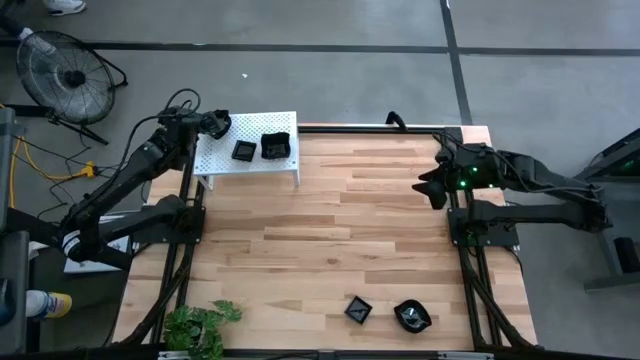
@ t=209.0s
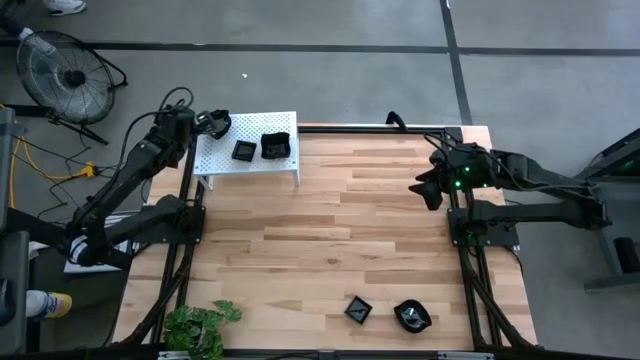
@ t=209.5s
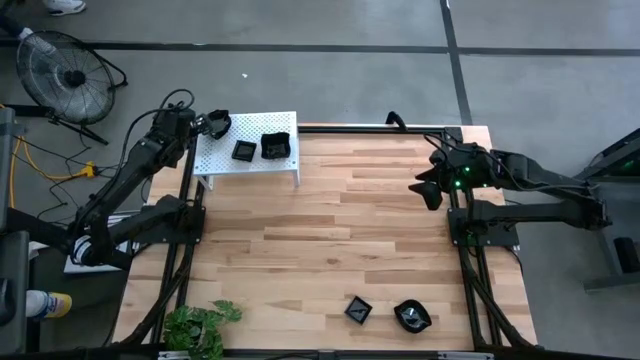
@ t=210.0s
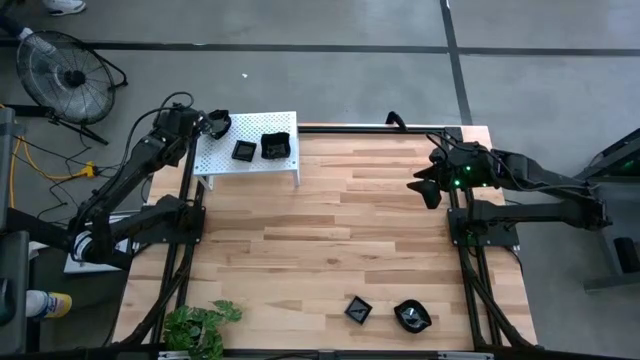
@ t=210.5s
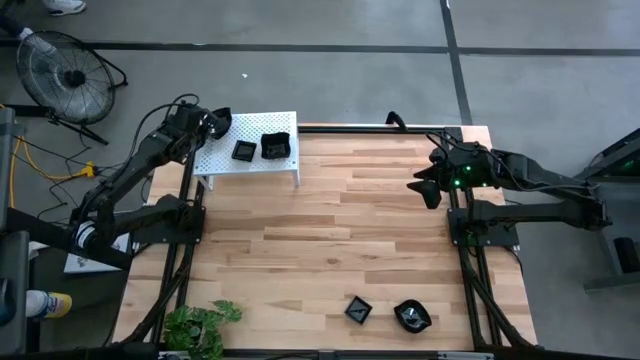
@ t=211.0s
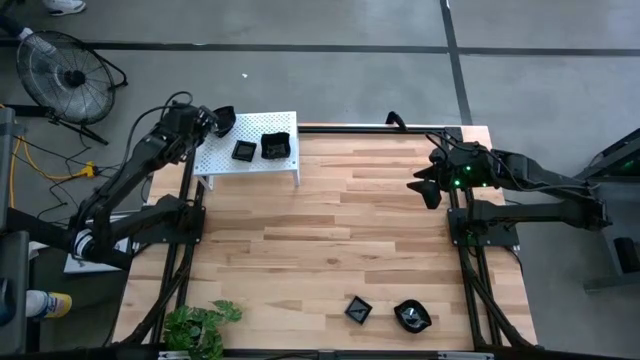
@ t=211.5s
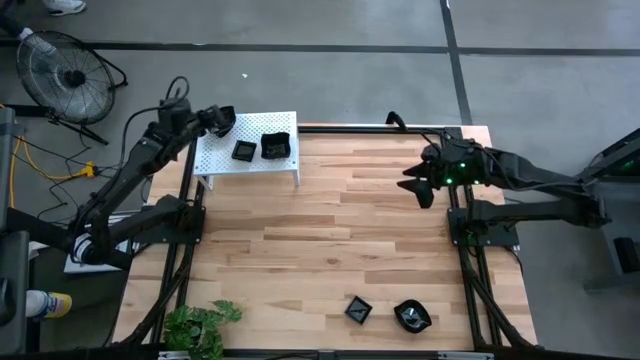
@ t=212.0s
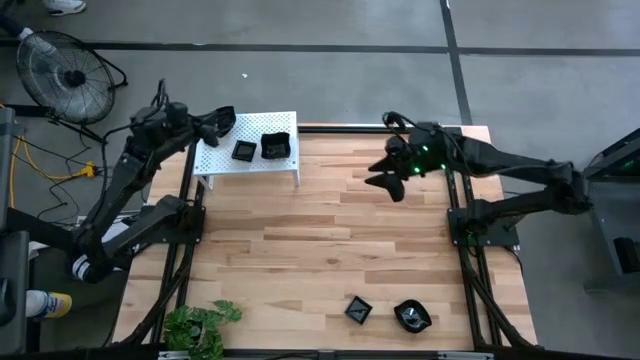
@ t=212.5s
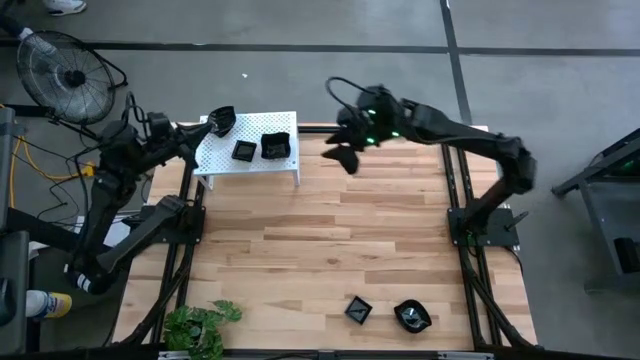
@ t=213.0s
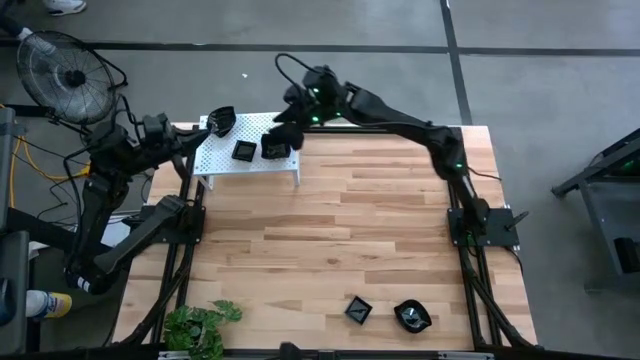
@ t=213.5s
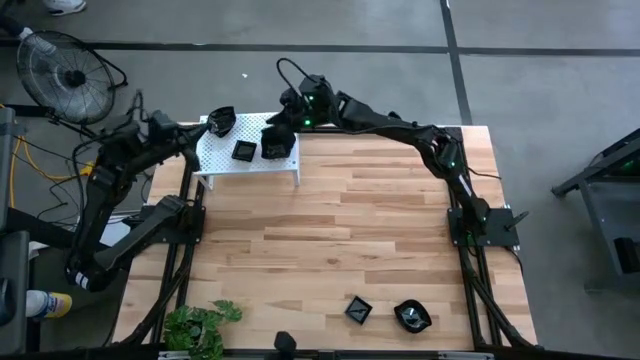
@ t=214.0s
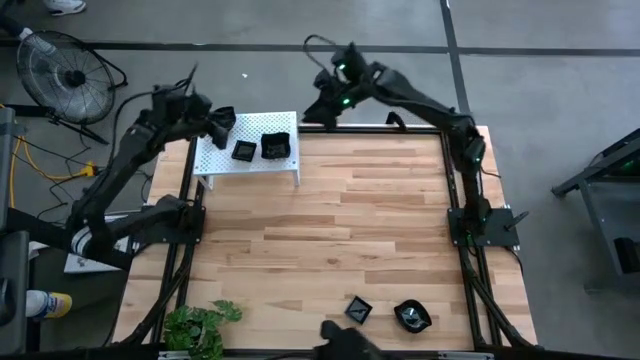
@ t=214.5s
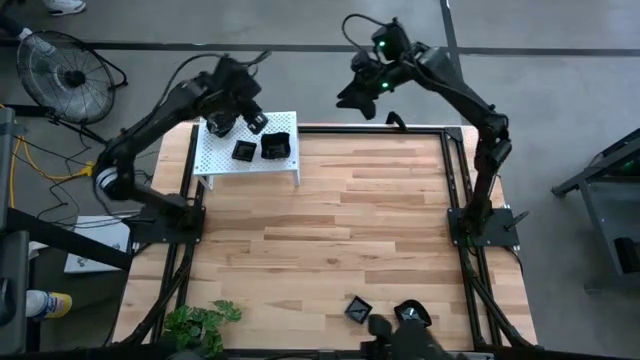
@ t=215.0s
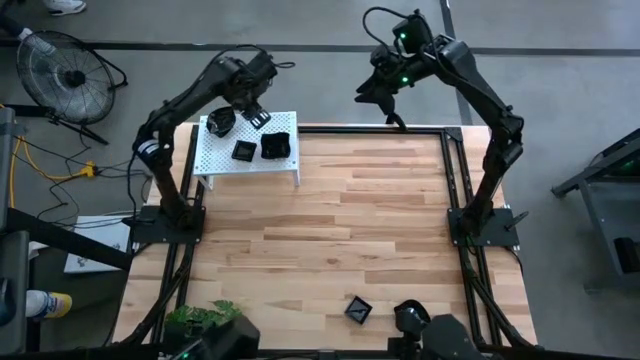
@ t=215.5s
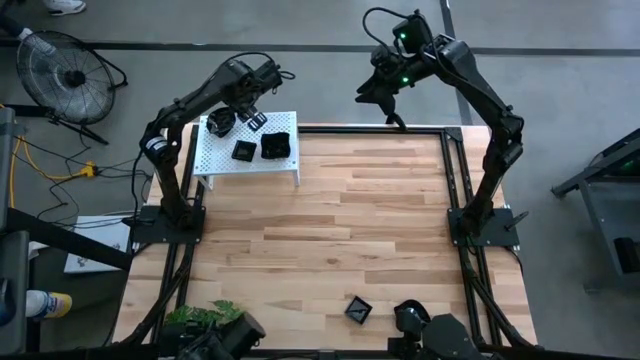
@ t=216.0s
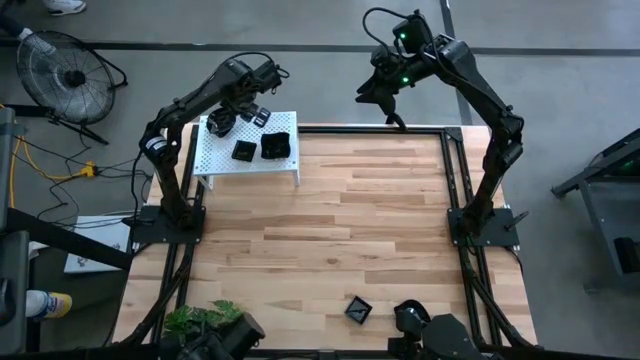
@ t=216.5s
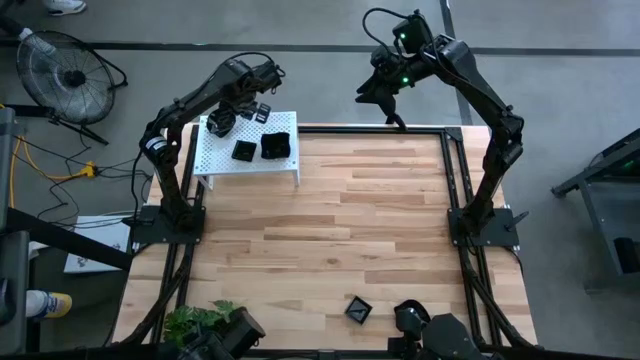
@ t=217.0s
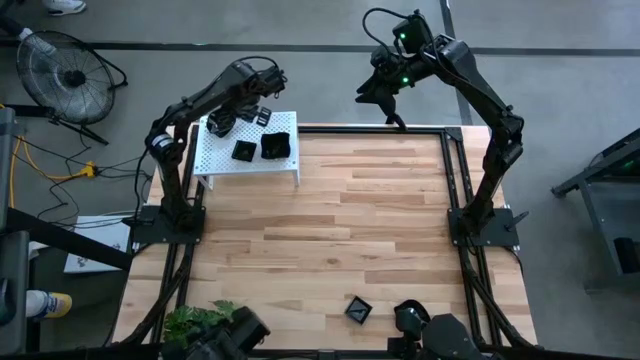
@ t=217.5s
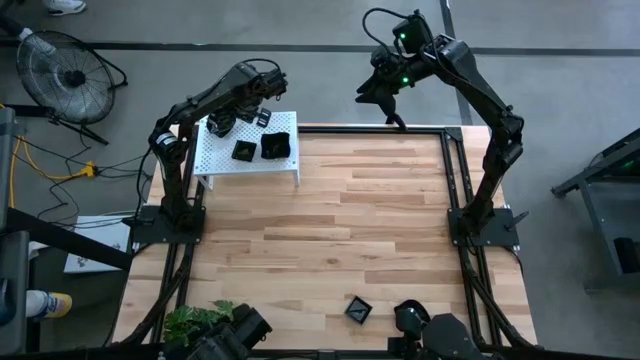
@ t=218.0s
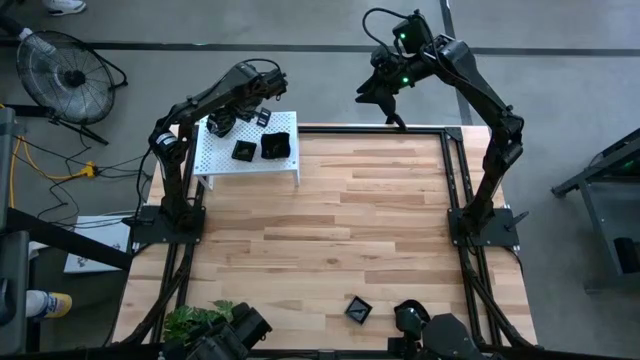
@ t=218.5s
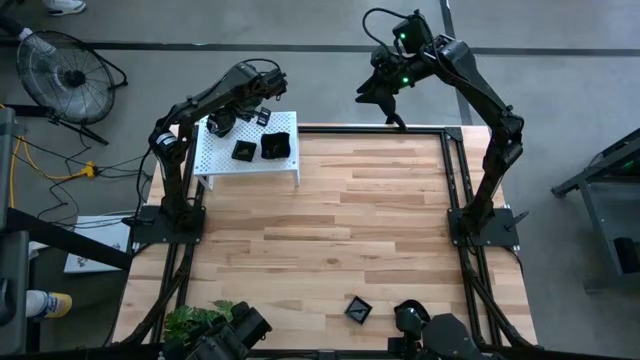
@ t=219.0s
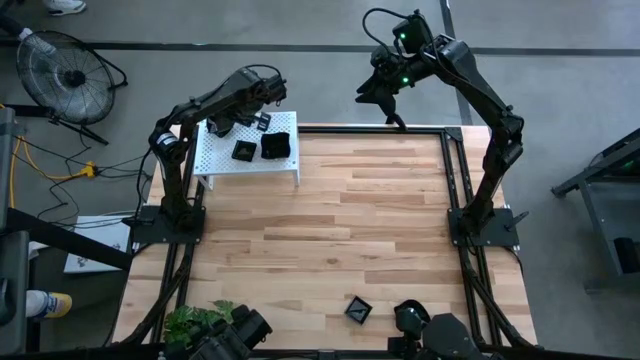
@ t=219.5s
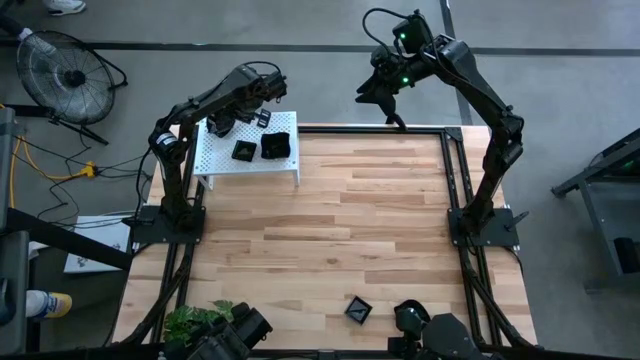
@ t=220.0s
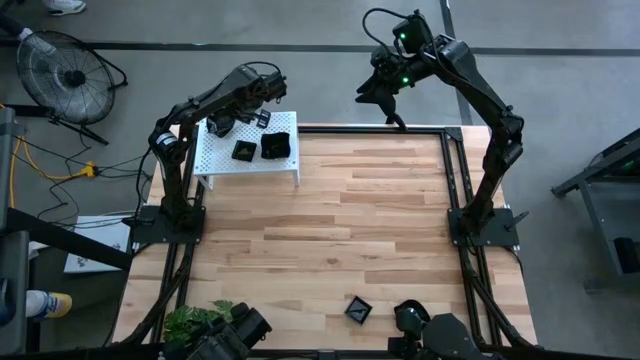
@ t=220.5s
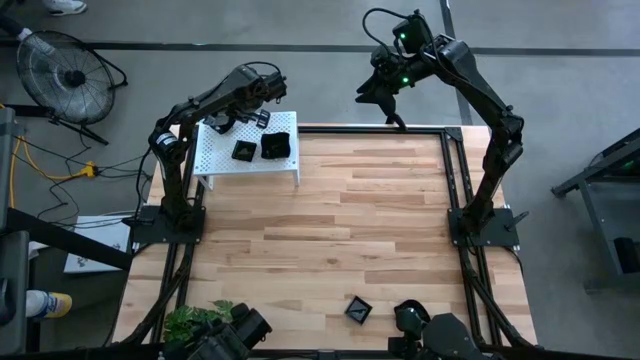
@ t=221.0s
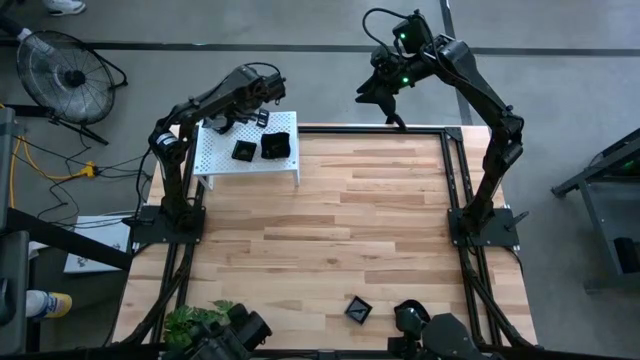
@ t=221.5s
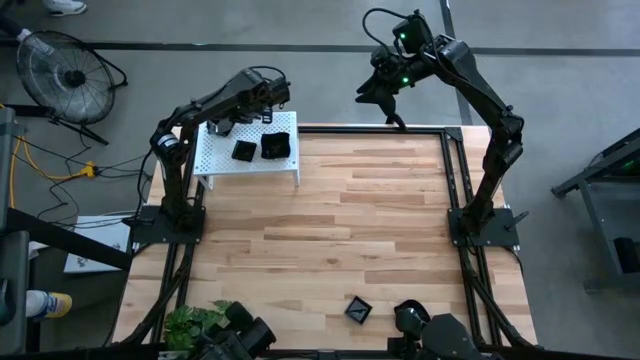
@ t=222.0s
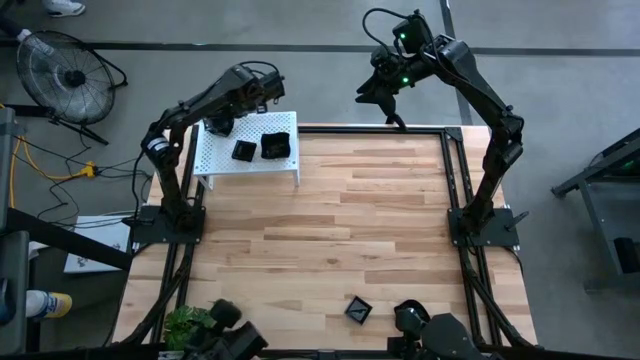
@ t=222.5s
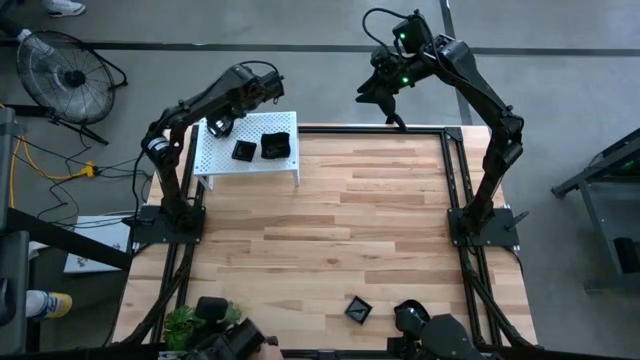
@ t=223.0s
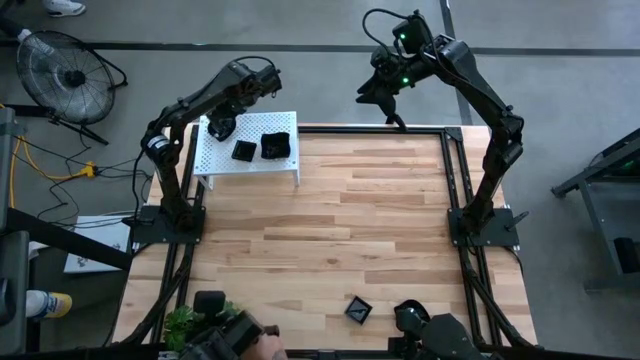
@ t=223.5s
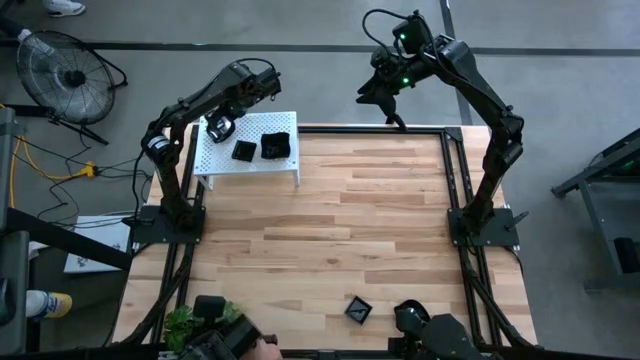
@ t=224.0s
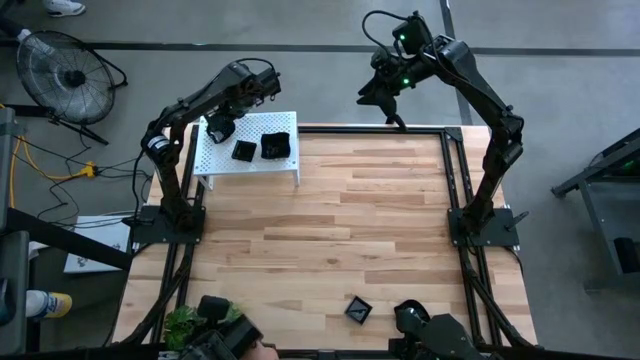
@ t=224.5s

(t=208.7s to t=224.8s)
Task: Pick & Place Mini shaped plates
Stack the black leaf shaped plate on top of the black leaf shaped plate on the shelf

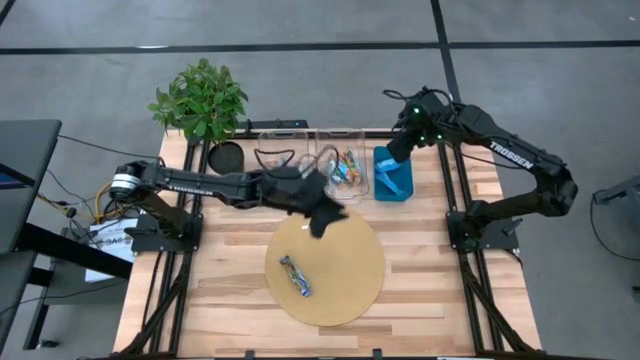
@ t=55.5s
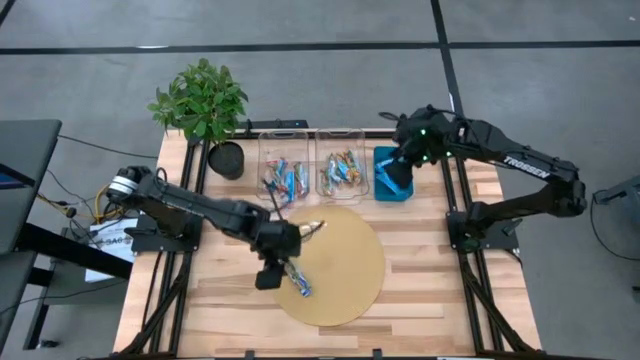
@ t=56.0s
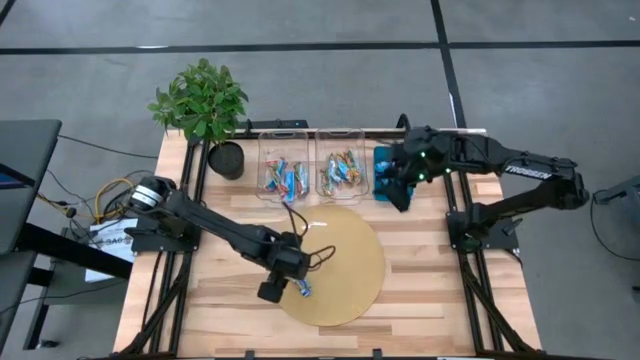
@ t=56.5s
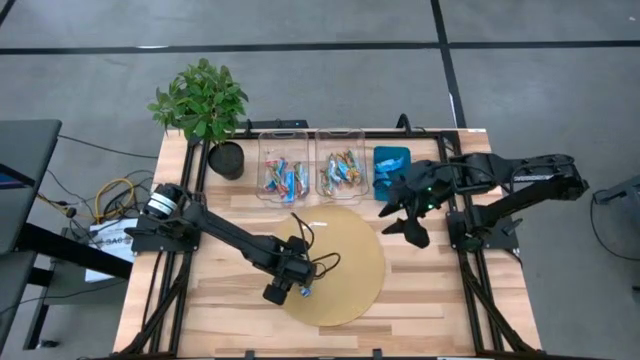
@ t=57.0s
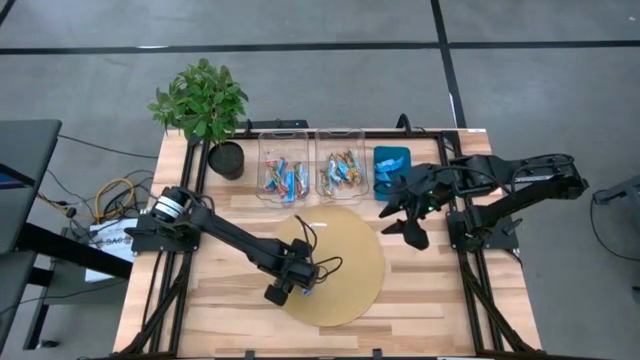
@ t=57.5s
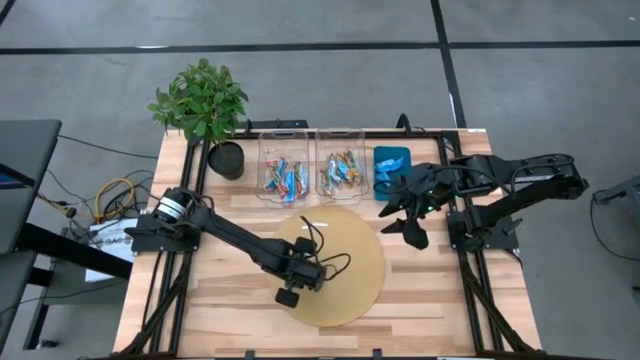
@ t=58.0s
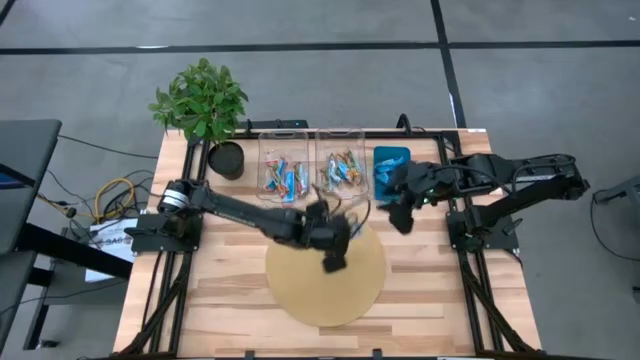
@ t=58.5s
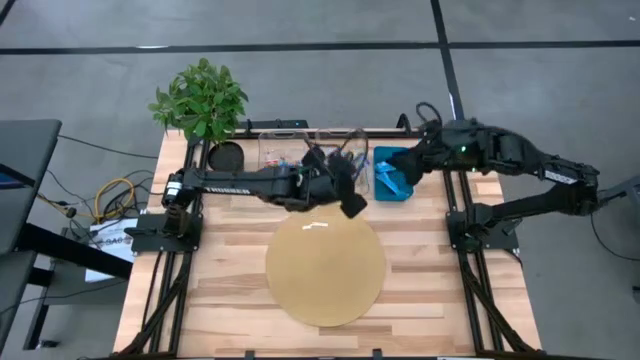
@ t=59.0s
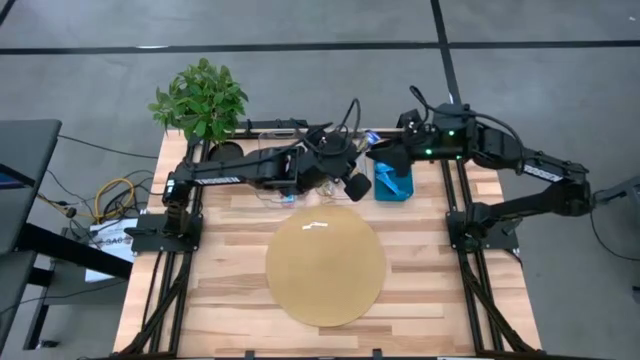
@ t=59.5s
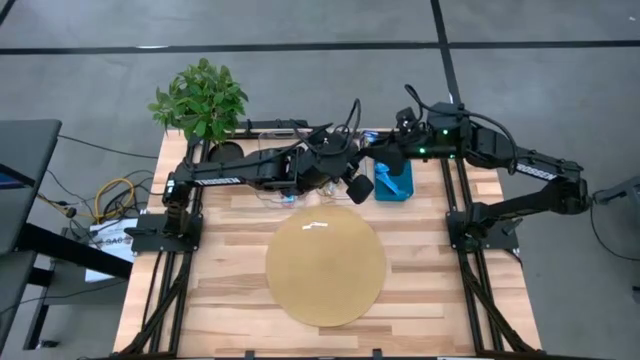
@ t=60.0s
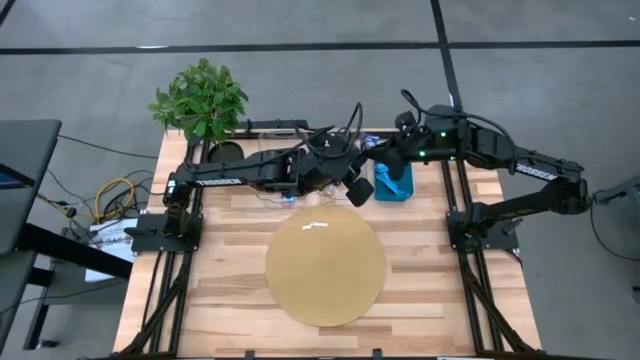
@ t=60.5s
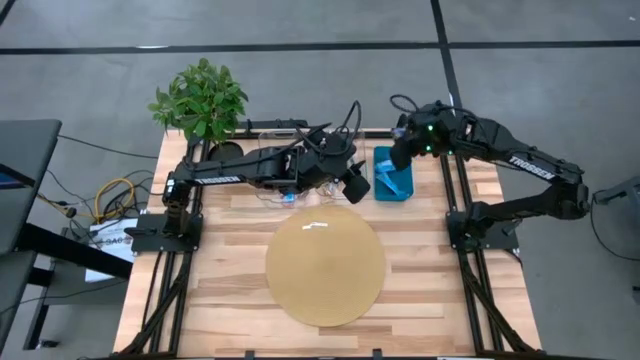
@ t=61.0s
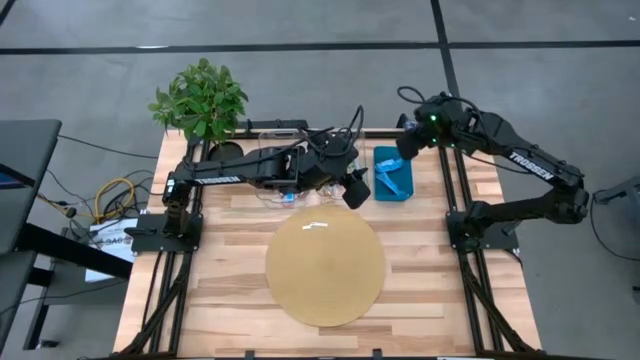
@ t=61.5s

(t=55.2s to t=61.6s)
Task: Pick and place Granola Bars by type
Put the blue granola bar into the blue bin
